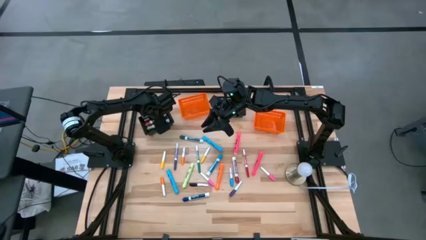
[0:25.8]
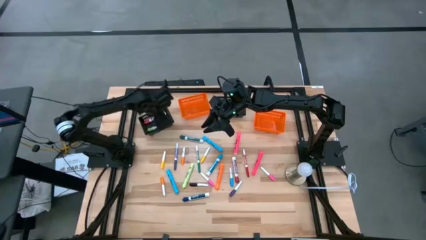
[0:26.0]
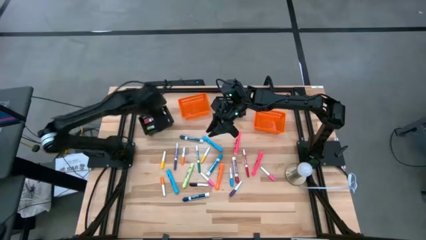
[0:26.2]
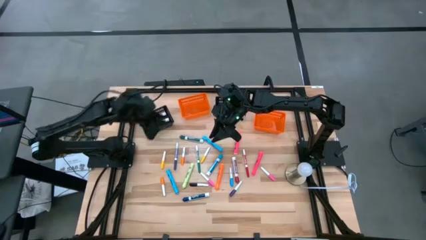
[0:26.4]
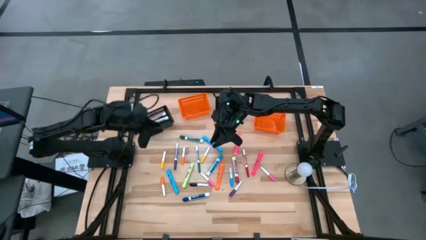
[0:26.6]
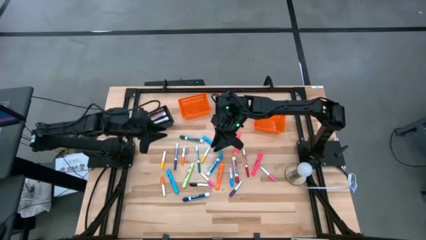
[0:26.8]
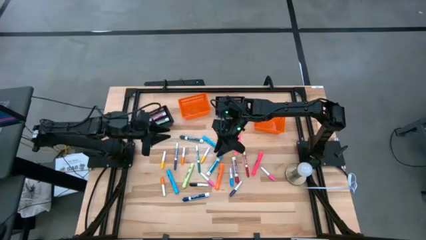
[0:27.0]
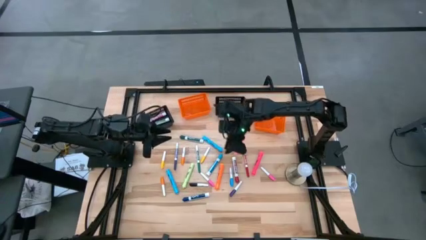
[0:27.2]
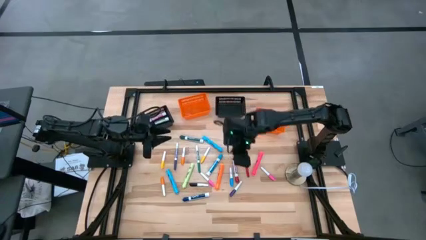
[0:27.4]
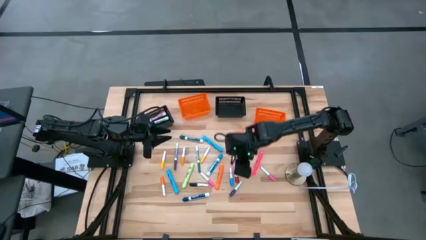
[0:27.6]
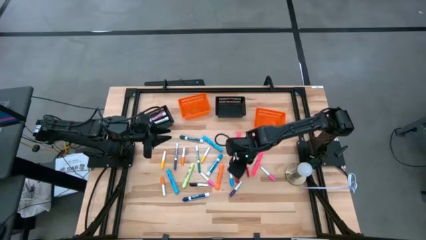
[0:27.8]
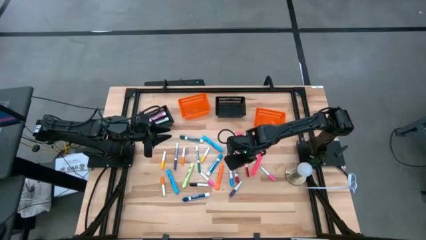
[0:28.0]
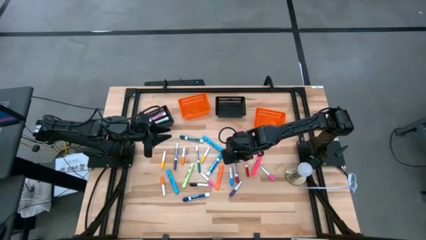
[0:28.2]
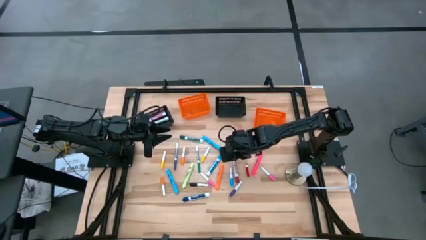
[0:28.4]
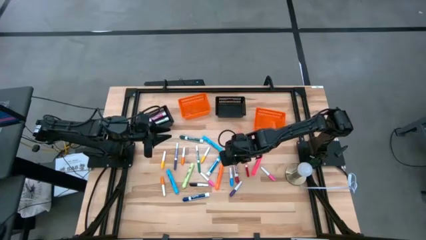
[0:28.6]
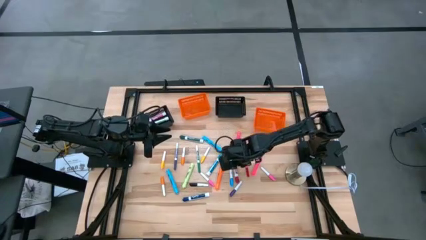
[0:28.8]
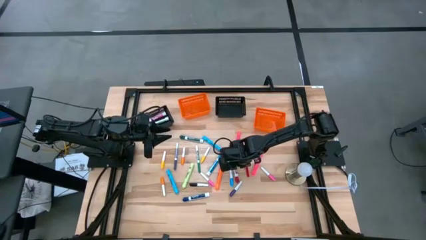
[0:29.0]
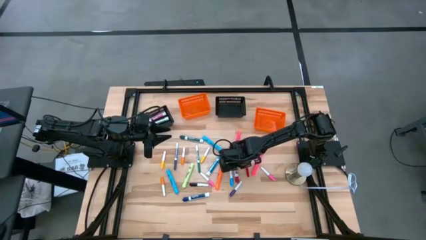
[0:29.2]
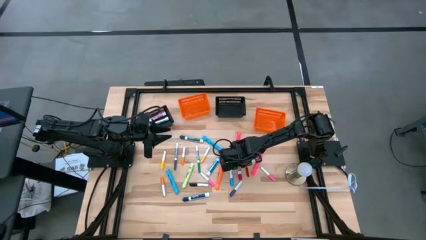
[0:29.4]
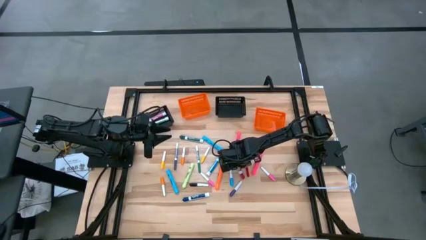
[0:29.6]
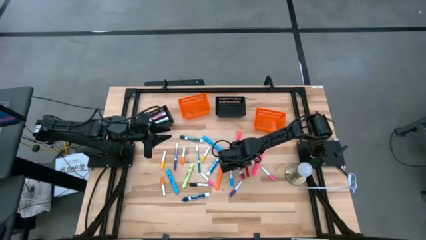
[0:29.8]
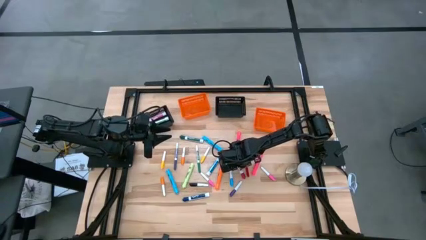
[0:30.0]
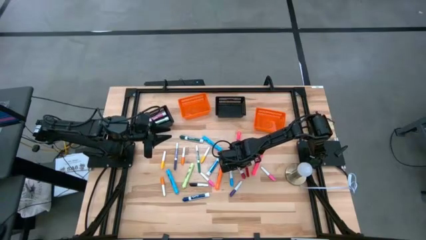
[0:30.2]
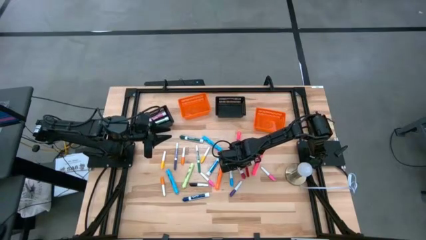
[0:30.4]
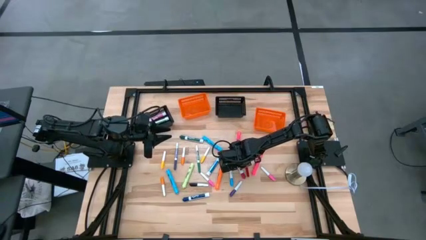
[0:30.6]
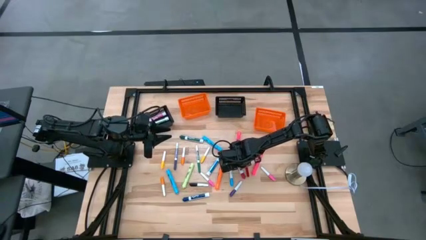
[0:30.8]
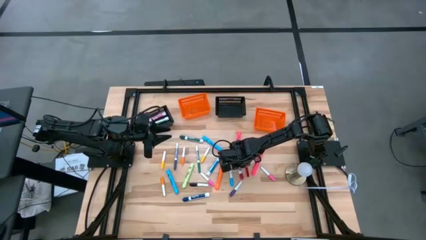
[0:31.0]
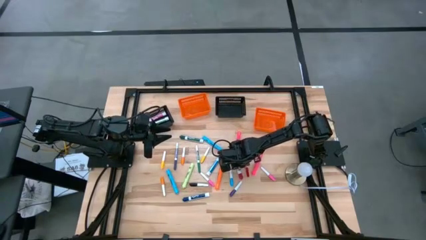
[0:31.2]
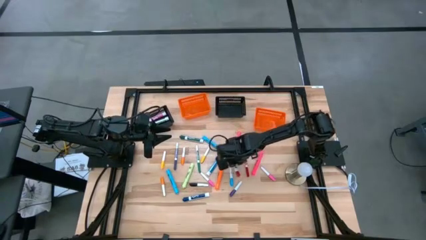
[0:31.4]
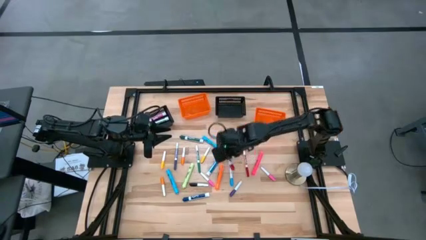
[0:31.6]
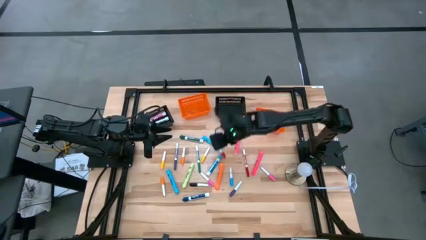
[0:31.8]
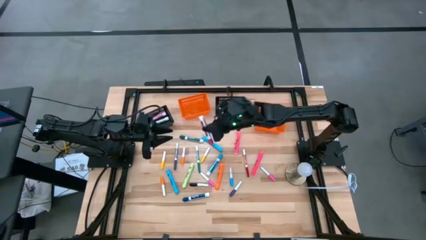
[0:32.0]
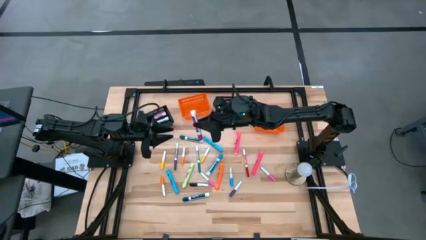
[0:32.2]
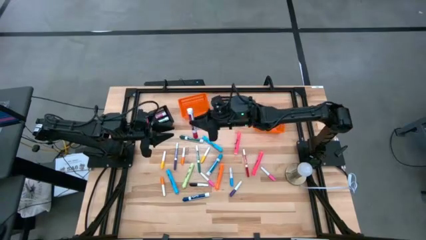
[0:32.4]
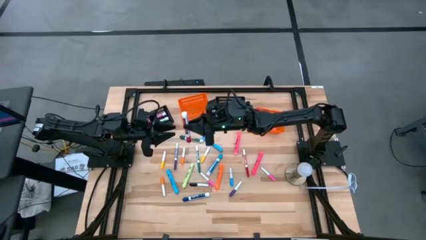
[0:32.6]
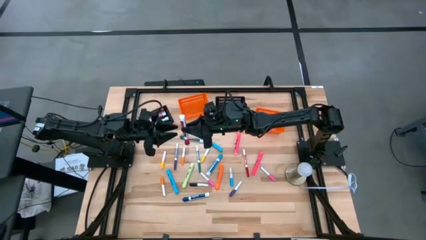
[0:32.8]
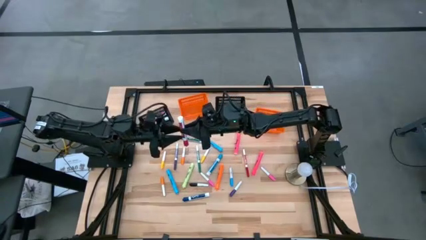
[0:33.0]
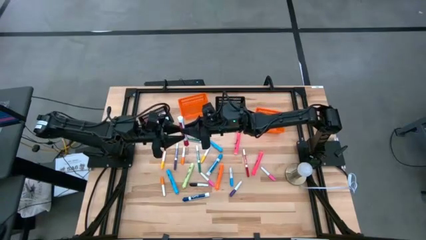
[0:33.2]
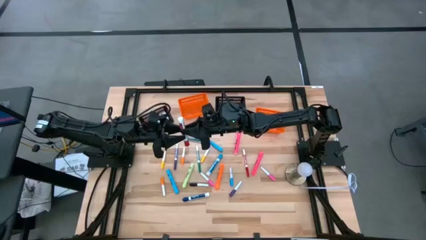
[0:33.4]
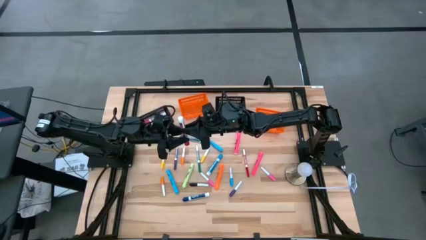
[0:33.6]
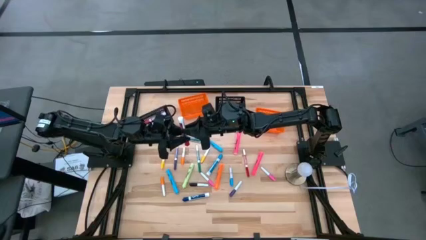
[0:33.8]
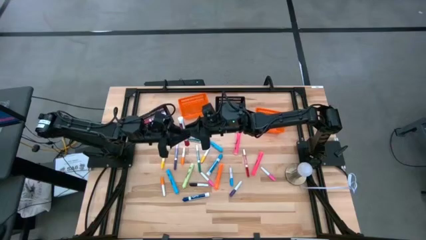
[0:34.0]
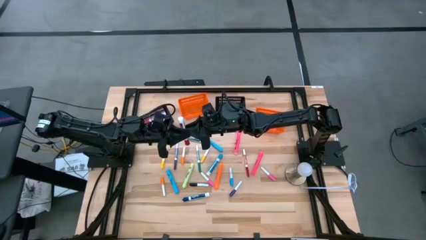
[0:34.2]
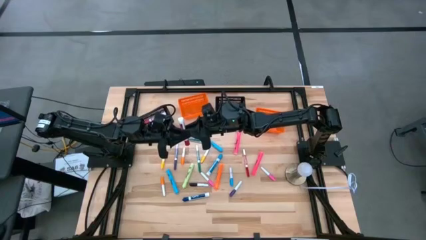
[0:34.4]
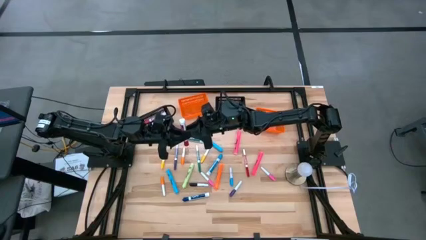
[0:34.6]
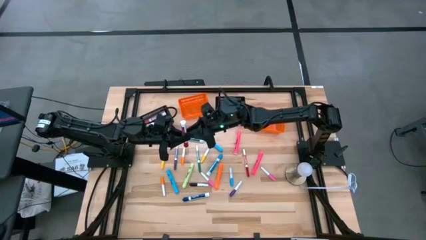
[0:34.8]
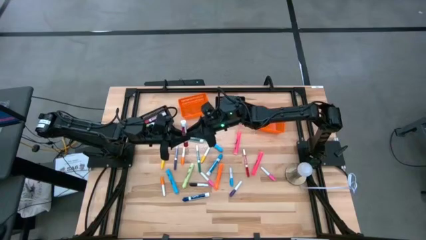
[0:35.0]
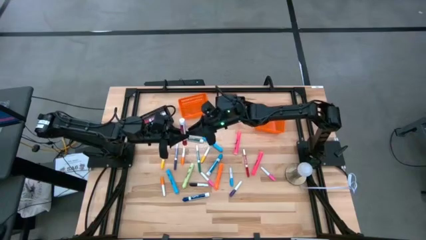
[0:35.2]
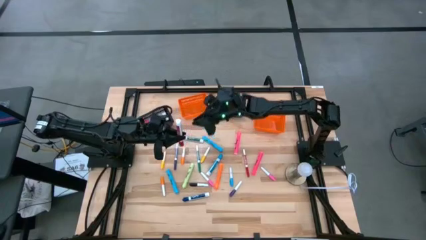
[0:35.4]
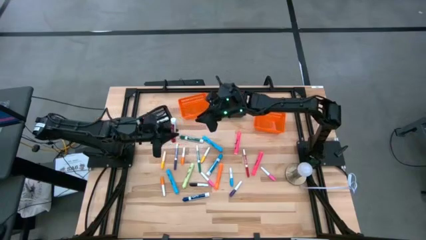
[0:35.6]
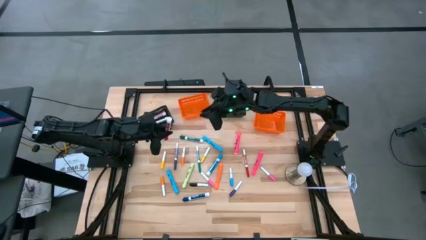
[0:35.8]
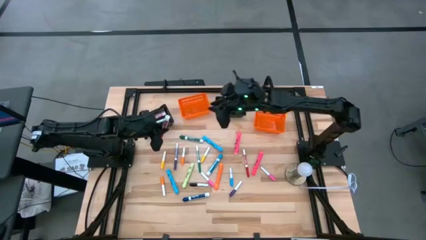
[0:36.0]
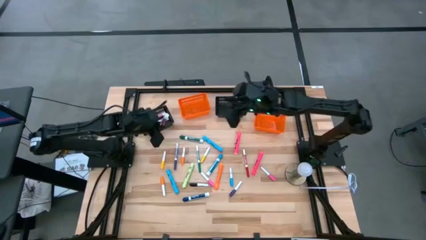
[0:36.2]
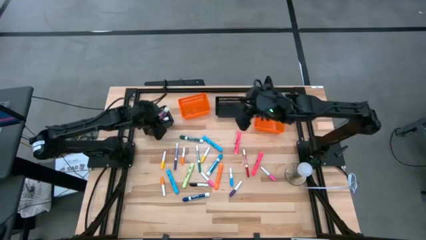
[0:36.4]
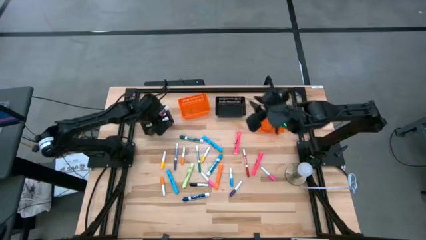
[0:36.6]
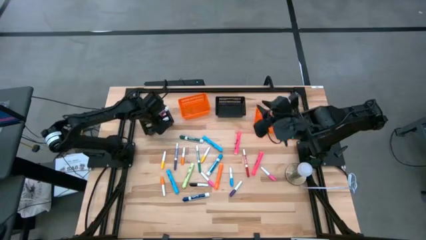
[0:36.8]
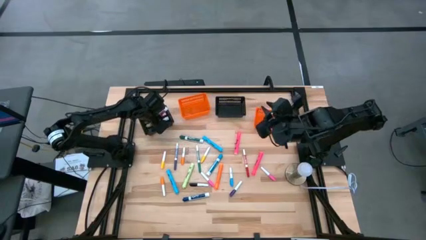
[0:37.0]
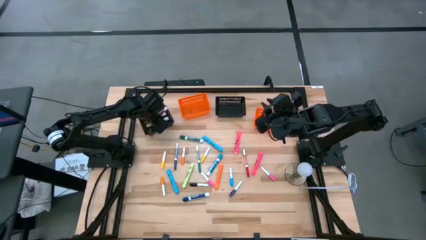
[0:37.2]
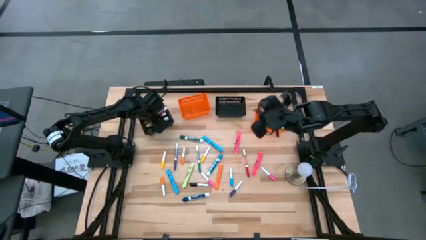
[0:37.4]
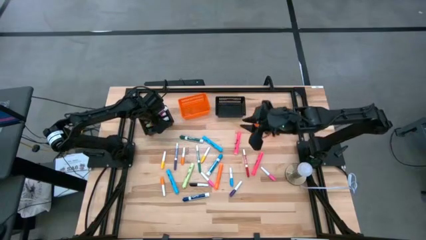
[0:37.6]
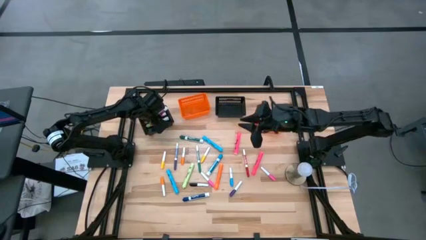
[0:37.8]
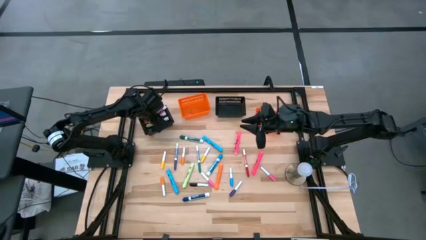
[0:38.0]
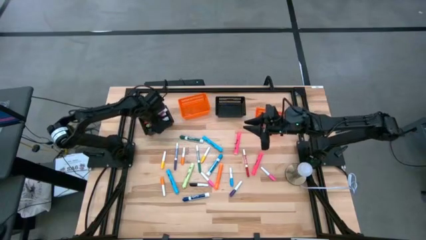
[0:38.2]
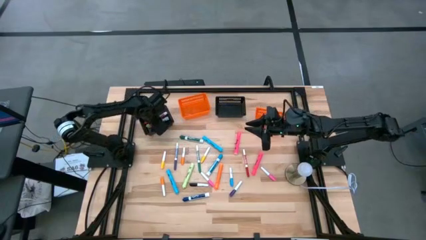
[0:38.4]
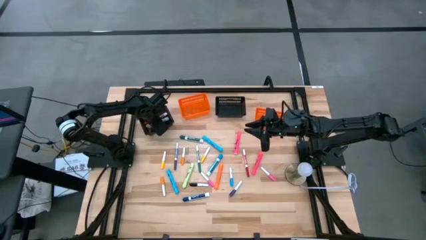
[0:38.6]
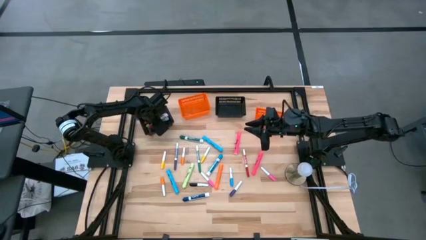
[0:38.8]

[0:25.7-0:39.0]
Task: Pick & Place Markers
Put the large red marker pen into the left black bin
